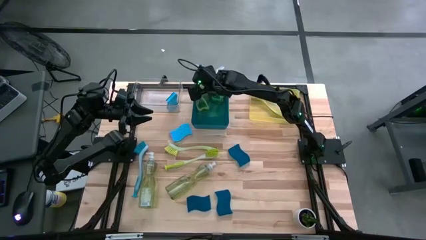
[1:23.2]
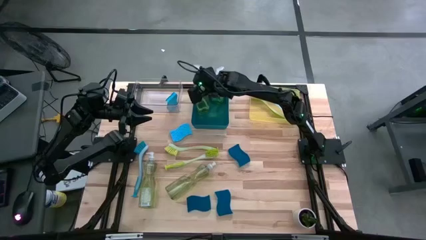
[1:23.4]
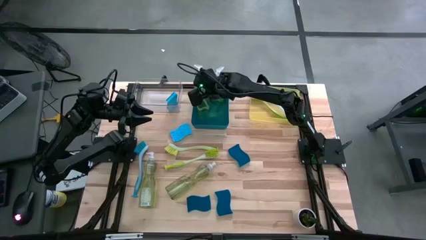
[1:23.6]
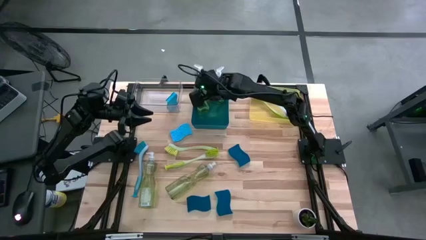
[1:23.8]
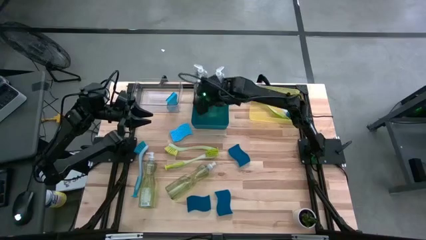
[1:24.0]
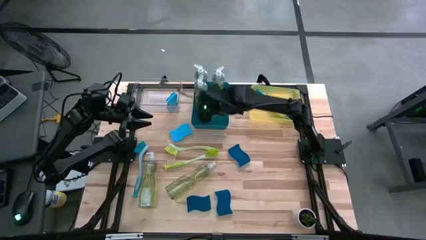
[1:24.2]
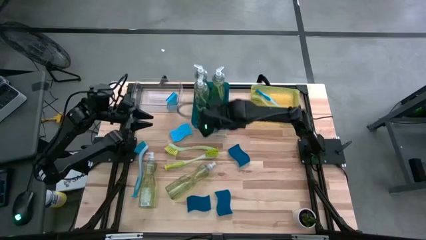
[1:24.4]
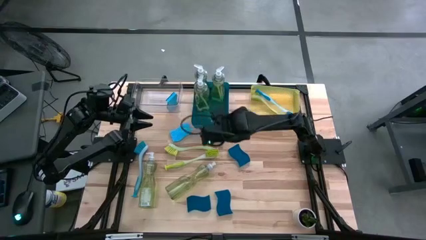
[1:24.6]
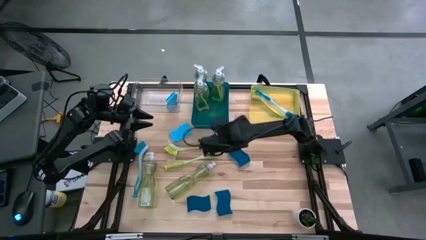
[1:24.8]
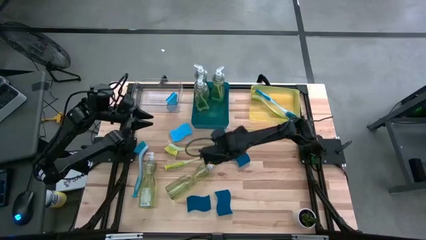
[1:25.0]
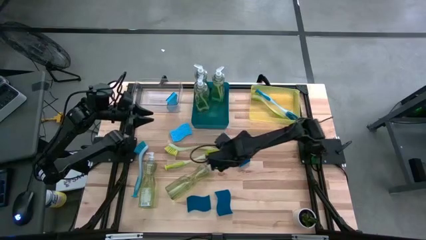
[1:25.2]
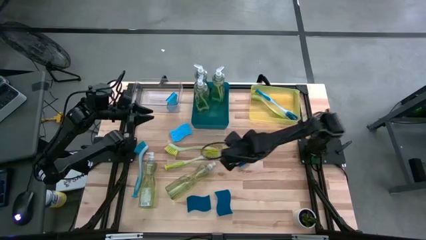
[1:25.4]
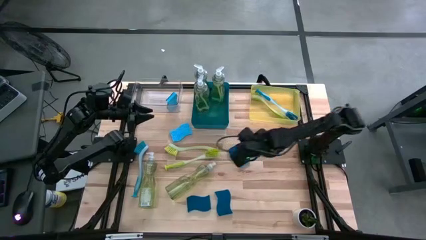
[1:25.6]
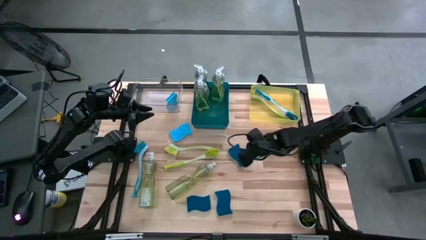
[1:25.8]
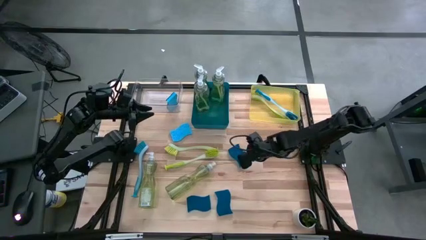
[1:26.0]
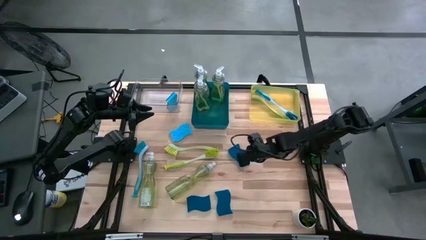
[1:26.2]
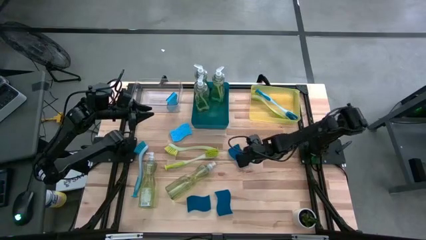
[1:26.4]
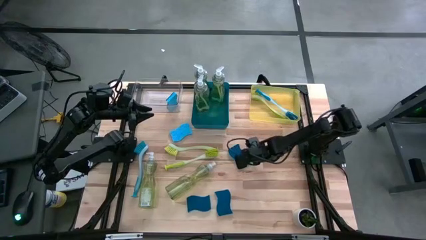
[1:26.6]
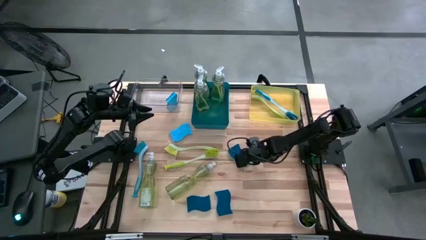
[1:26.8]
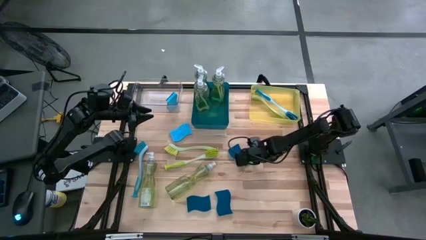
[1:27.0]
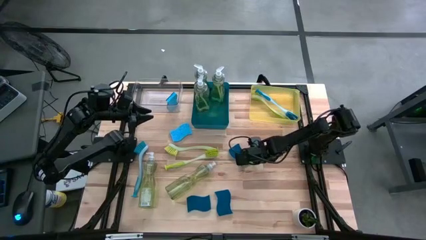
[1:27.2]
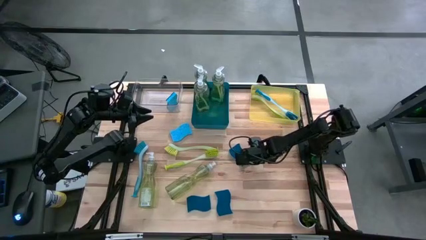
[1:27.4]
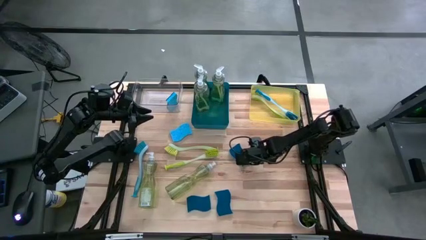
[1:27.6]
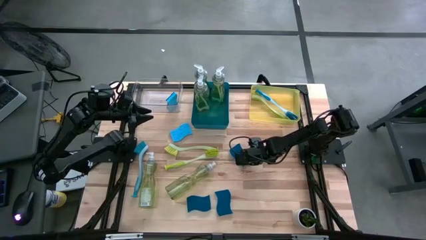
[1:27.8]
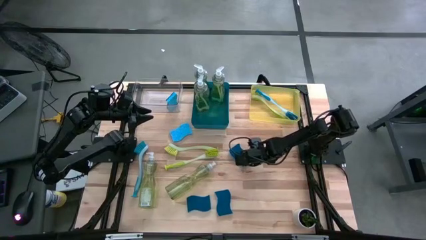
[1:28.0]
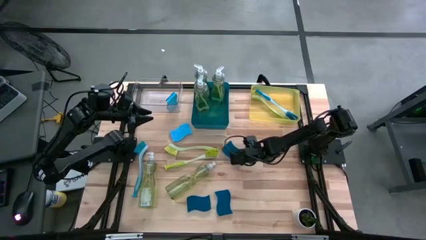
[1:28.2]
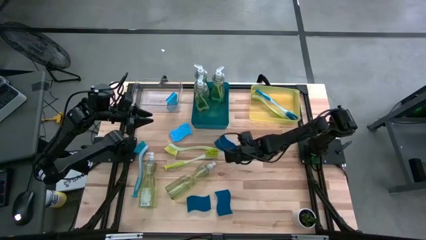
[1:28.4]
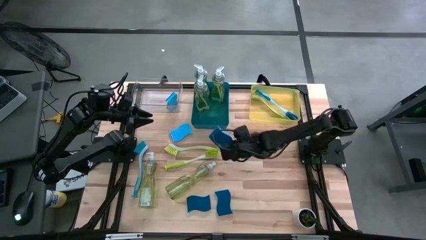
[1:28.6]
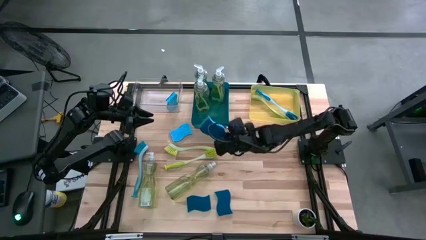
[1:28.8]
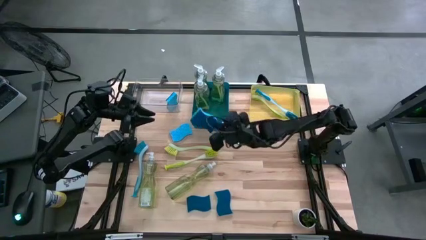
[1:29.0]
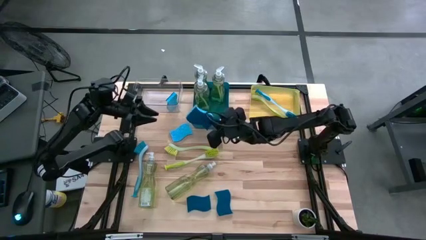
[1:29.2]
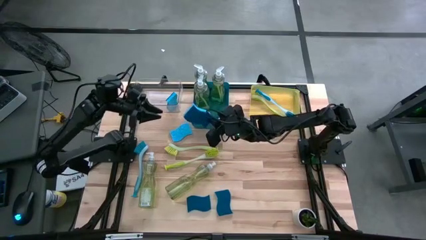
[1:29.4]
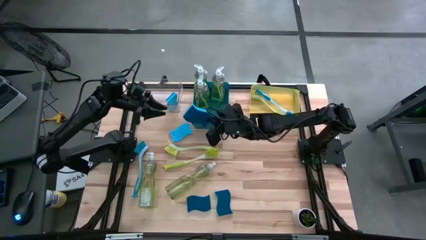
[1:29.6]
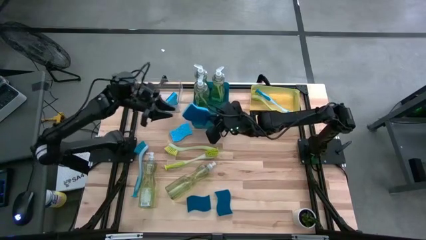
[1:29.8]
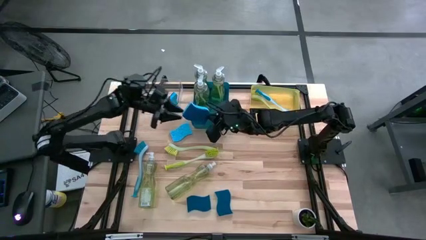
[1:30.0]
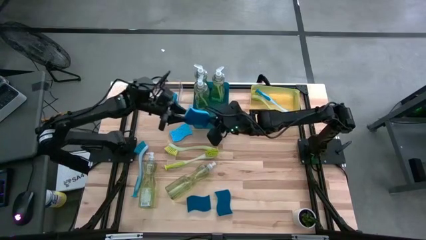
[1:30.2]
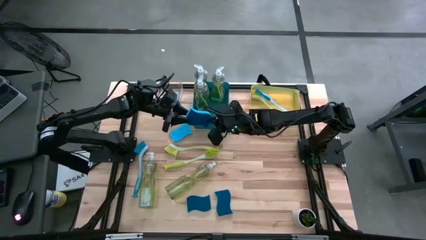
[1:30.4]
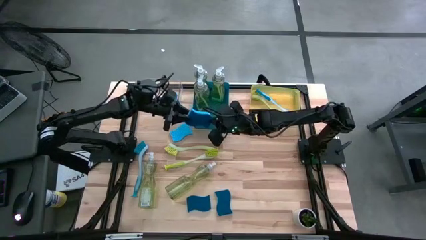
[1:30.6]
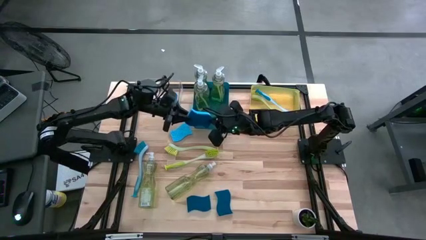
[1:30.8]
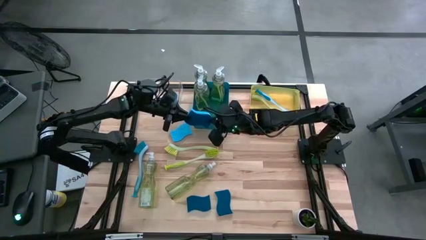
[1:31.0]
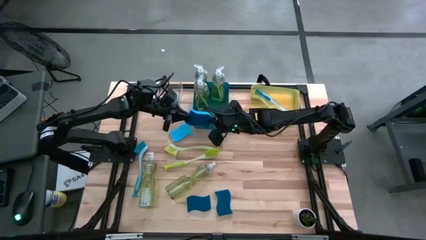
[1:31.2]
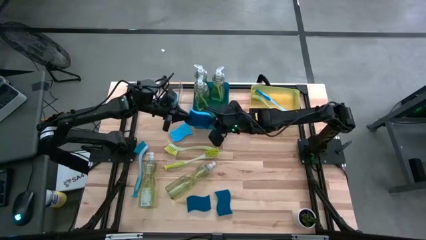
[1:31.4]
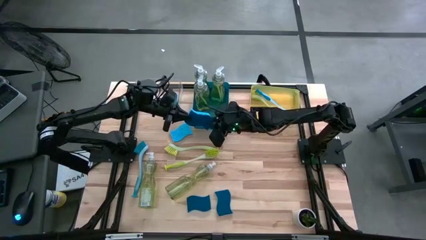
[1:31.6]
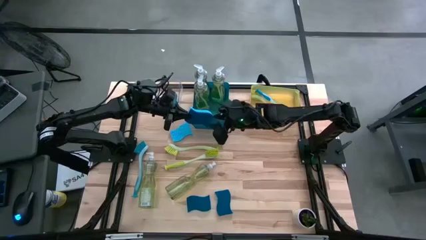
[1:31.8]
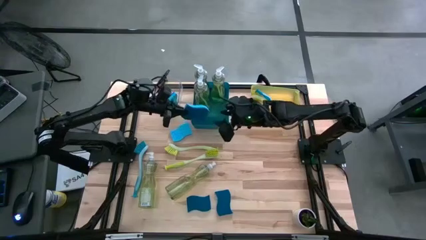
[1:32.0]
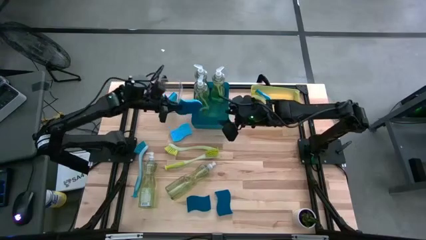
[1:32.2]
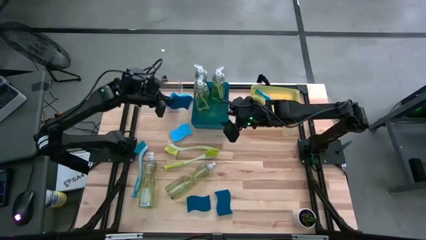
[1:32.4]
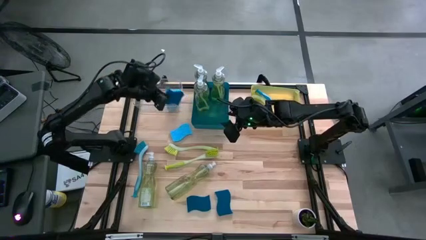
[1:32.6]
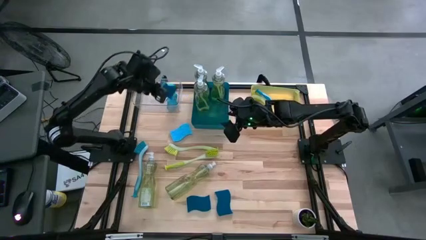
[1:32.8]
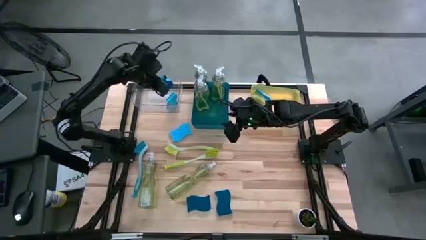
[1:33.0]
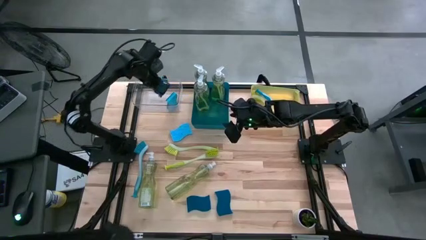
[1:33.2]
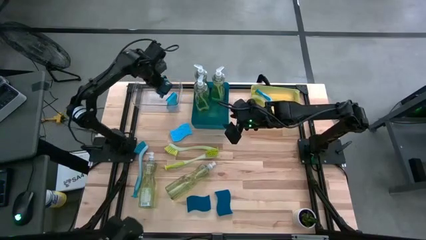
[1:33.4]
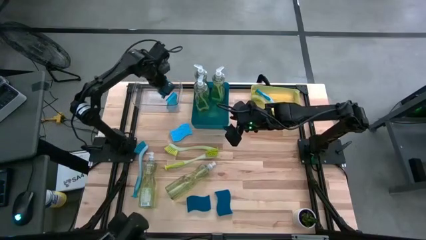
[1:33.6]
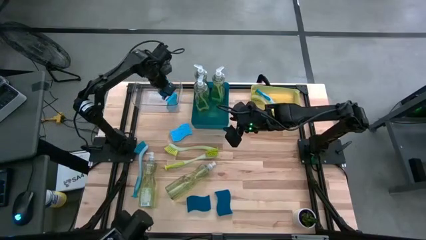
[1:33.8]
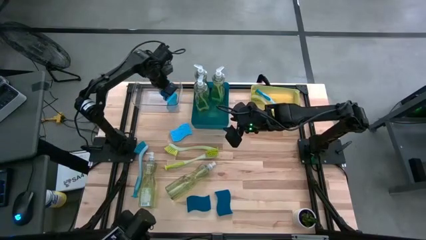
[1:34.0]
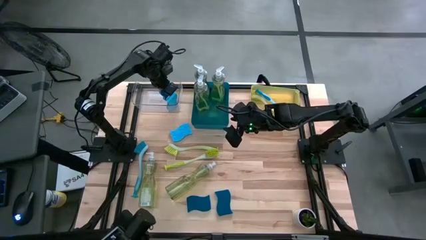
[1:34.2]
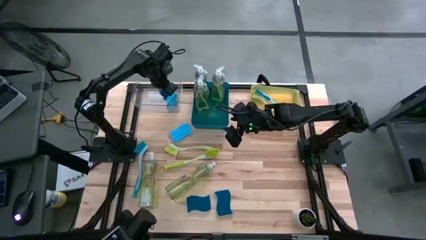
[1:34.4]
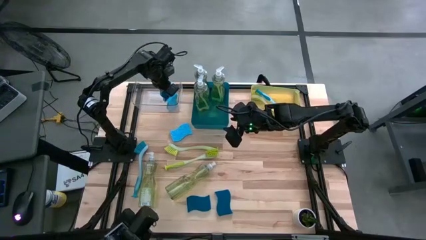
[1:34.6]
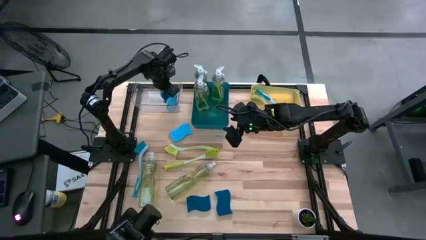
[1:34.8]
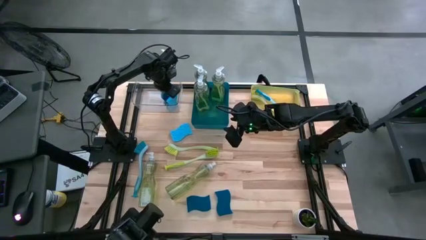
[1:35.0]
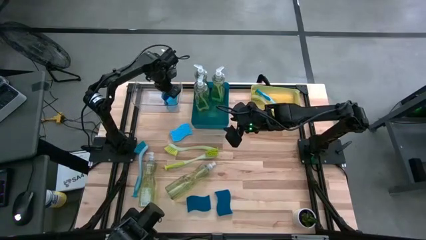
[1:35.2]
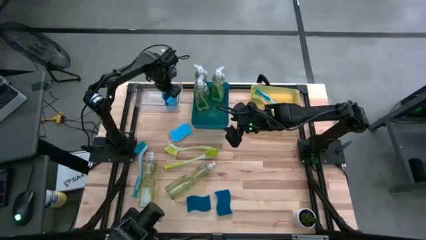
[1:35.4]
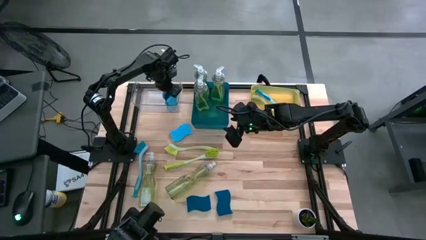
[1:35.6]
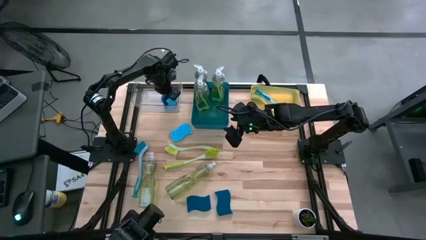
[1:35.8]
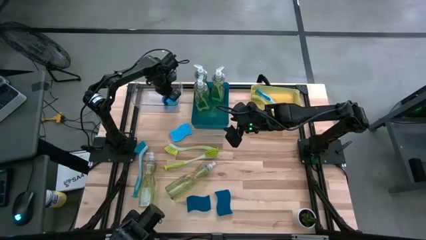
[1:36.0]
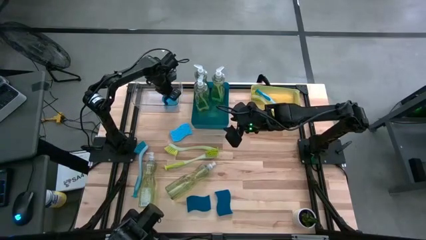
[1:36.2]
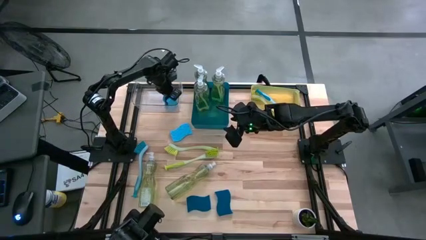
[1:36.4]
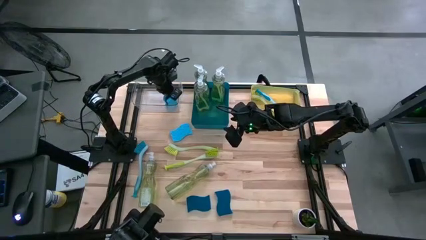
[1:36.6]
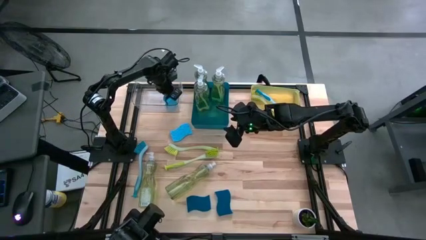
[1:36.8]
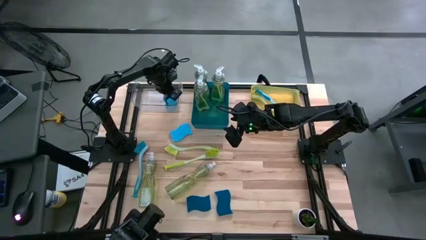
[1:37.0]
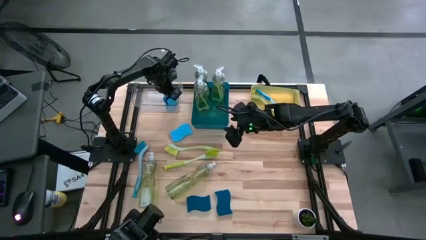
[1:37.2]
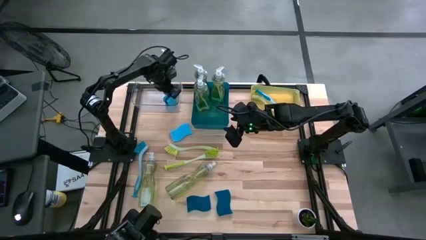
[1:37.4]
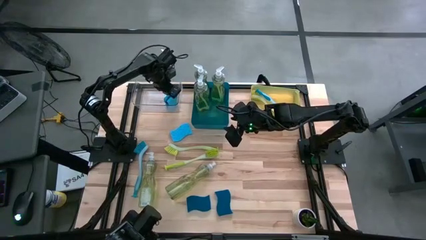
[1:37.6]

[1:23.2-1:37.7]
Task: Pick & Place Kitchen Sink Supplies
Put the blue sponge into the transparent bin

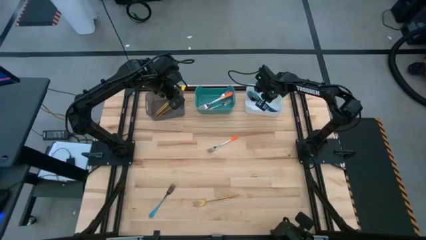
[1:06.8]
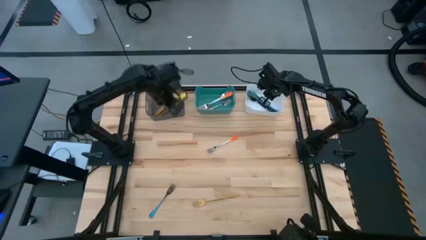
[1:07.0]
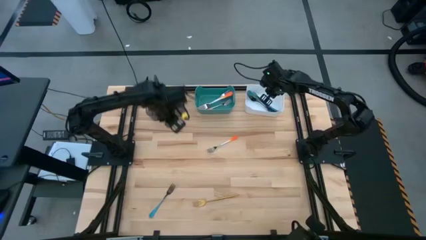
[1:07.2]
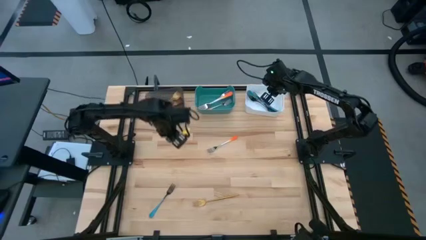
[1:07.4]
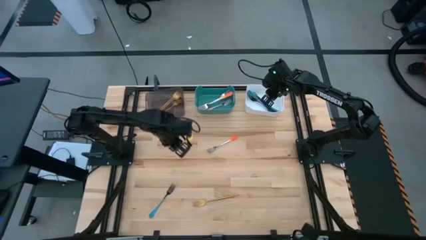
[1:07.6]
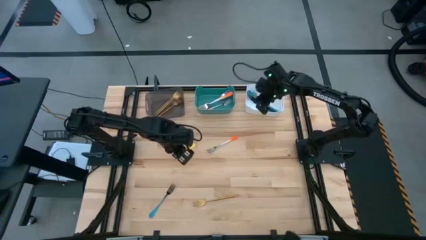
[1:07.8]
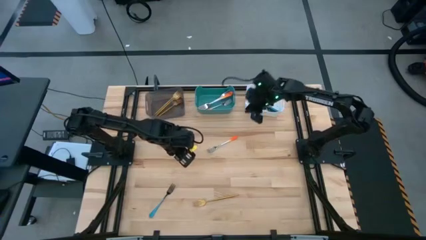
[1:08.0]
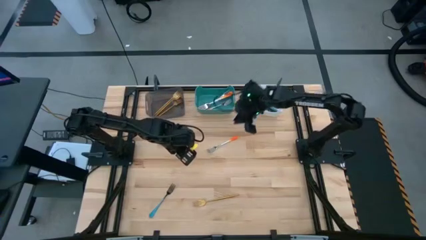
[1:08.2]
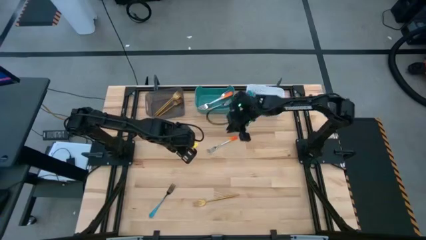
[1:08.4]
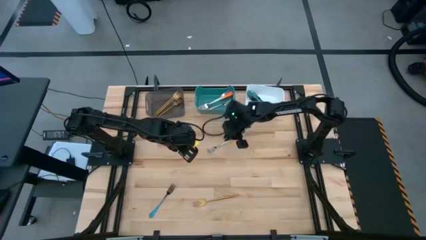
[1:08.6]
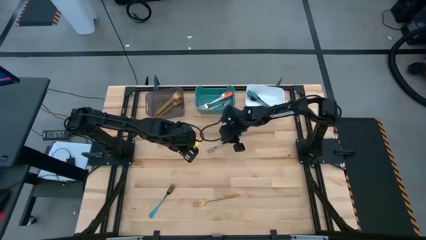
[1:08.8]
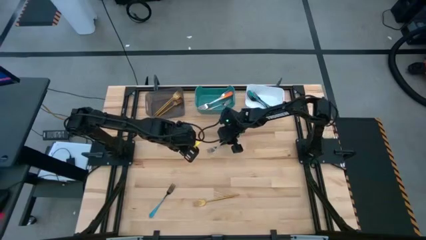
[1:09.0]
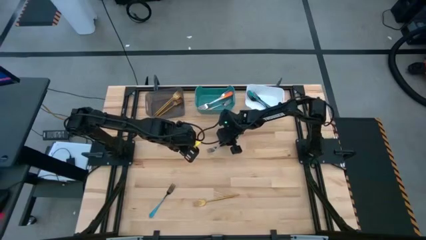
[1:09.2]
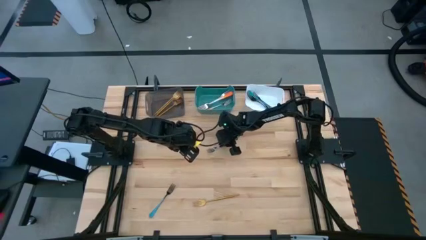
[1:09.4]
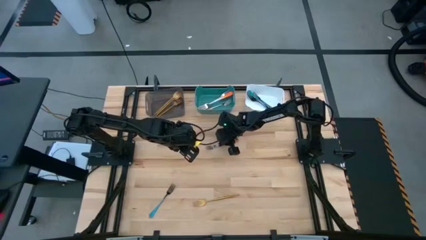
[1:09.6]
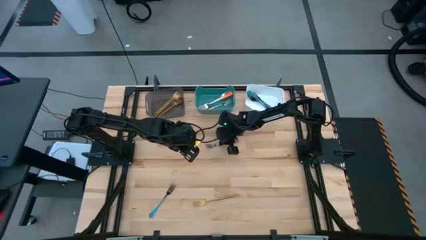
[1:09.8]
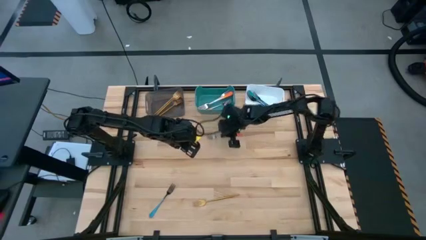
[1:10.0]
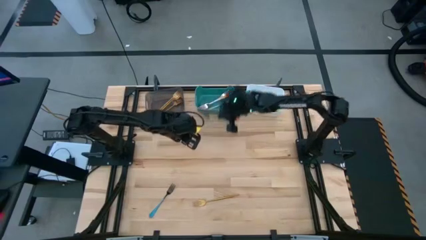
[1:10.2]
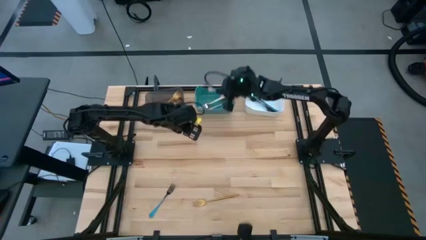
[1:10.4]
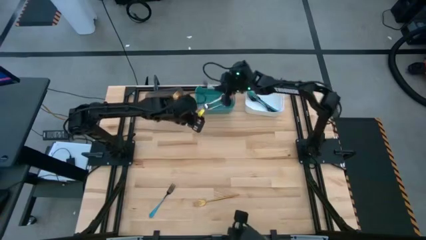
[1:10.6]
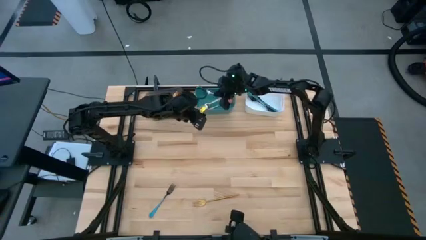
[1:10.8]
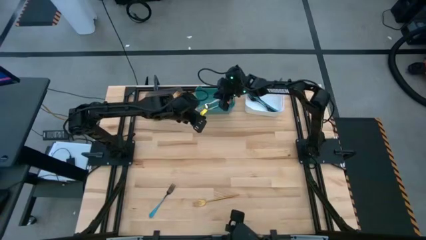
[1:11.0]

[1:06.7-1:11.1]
Task: Sort silverware by color (type)
Put the orange fork into the green bin
